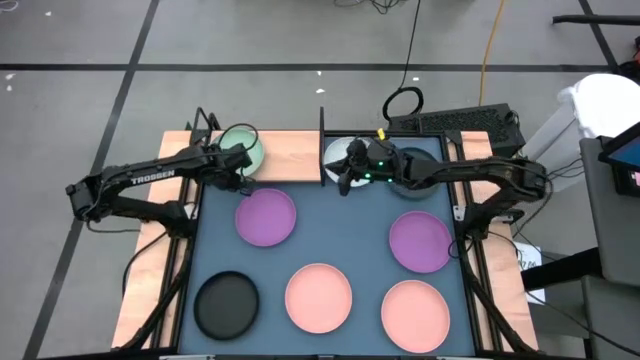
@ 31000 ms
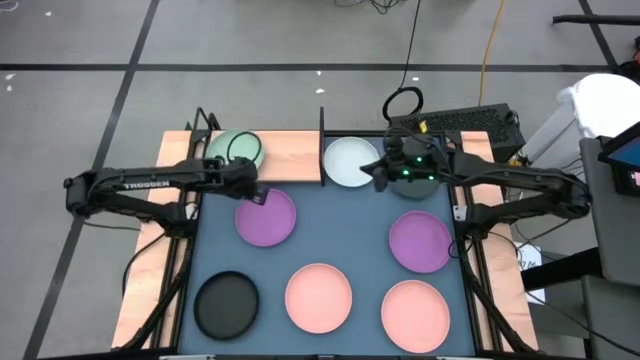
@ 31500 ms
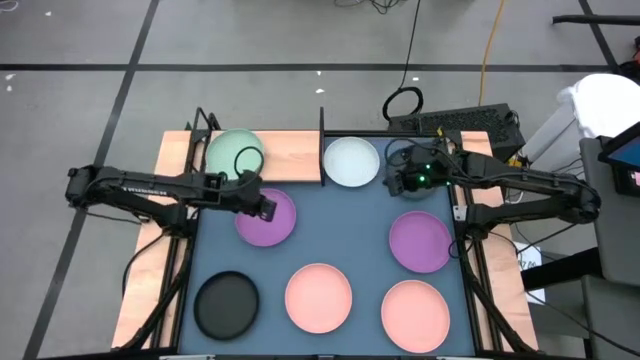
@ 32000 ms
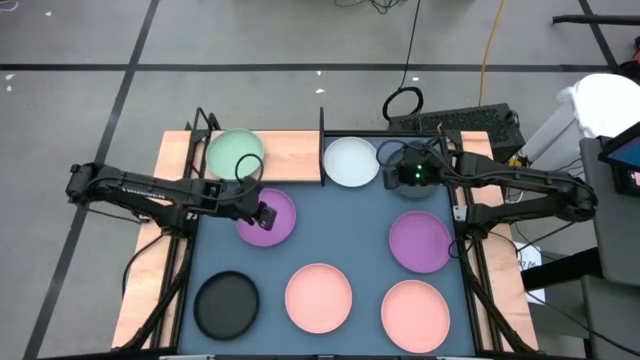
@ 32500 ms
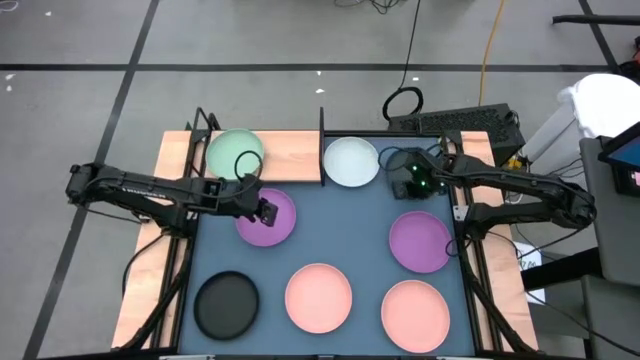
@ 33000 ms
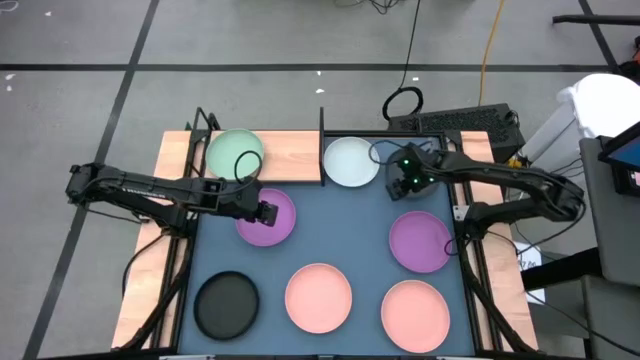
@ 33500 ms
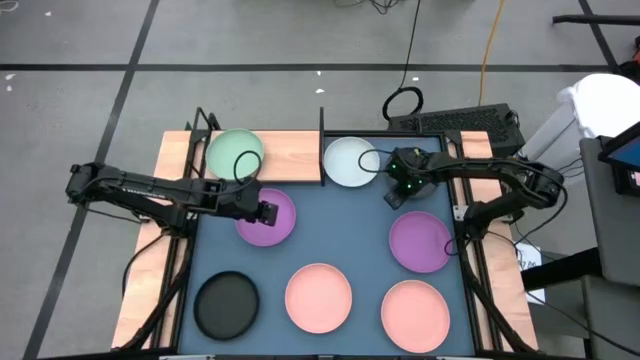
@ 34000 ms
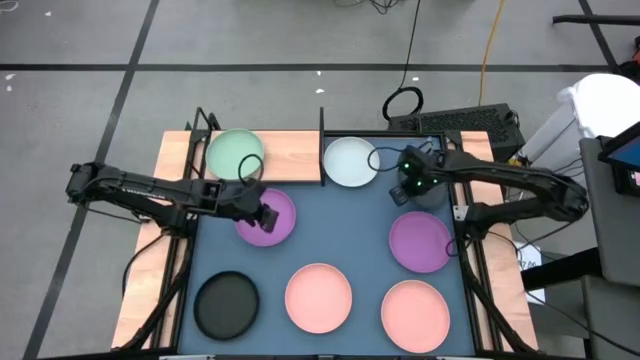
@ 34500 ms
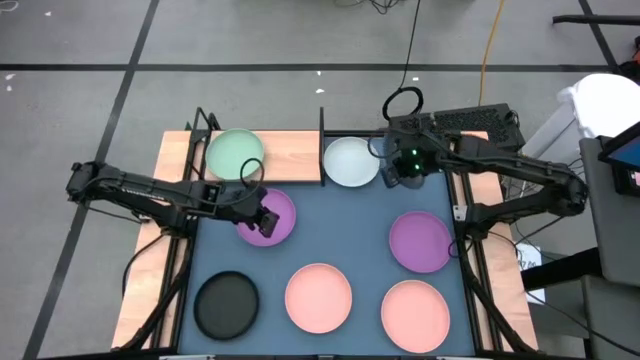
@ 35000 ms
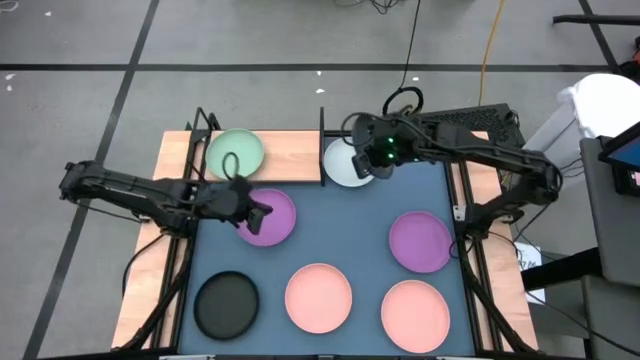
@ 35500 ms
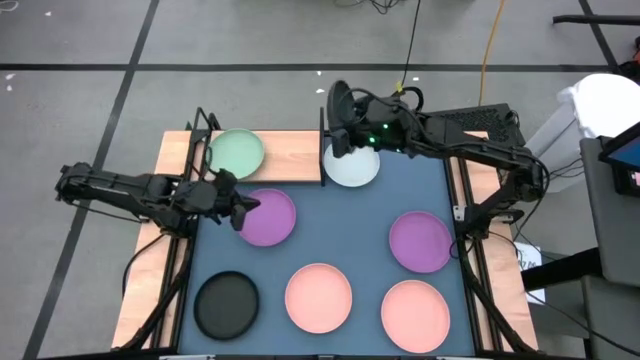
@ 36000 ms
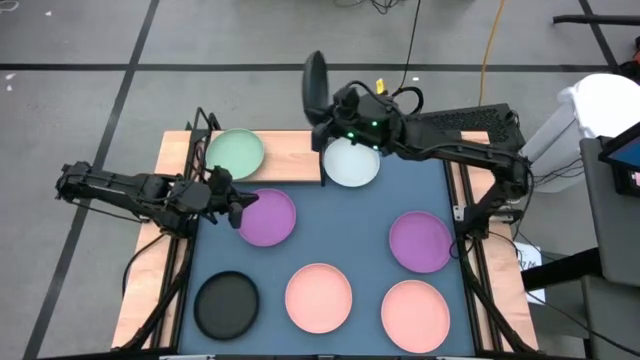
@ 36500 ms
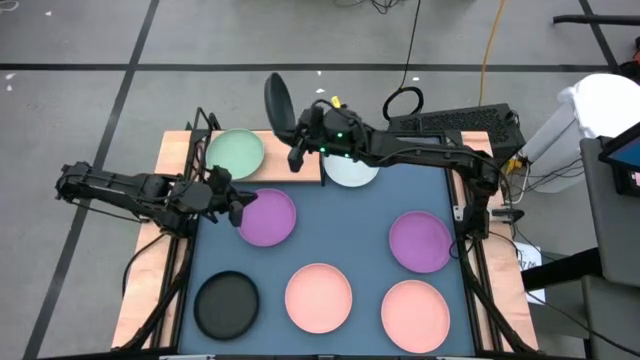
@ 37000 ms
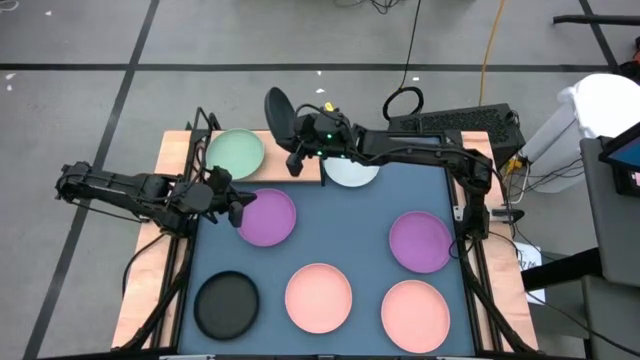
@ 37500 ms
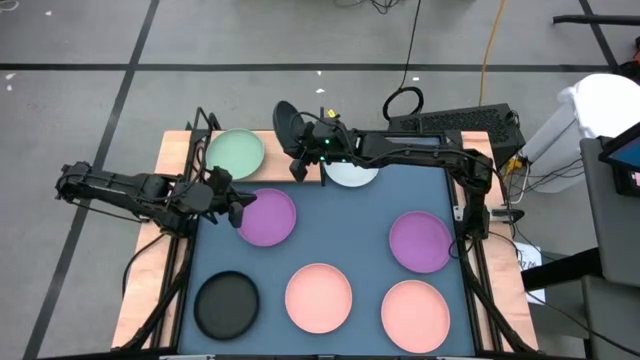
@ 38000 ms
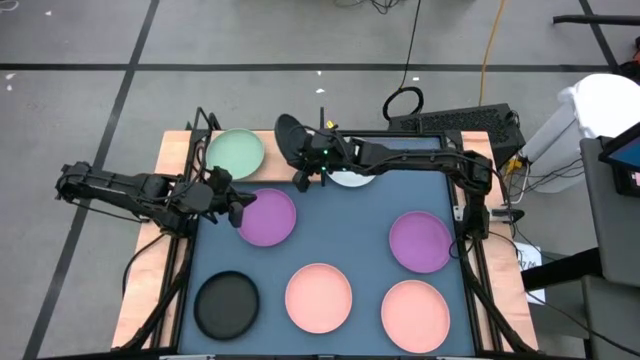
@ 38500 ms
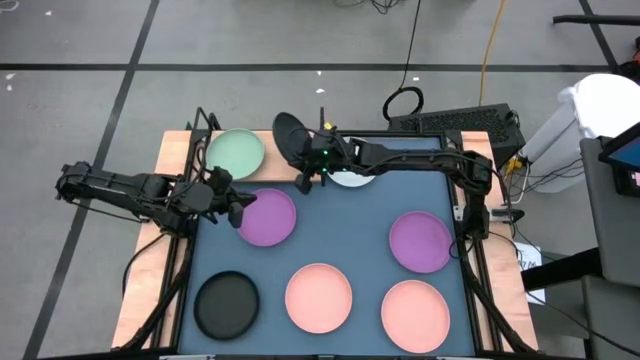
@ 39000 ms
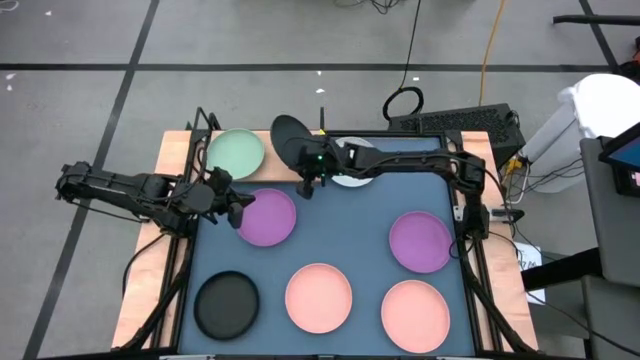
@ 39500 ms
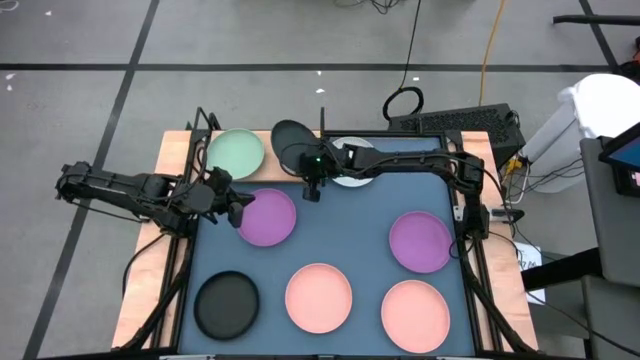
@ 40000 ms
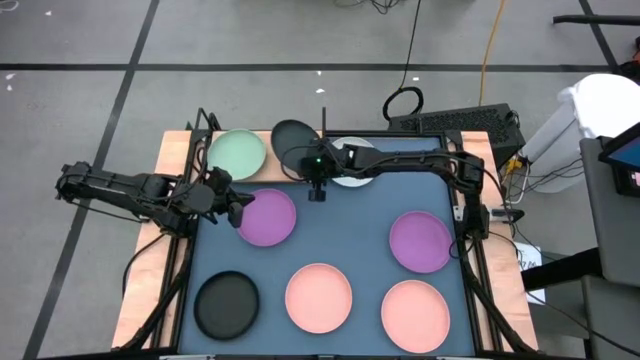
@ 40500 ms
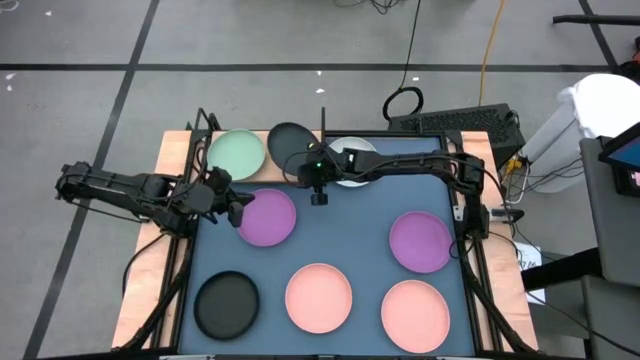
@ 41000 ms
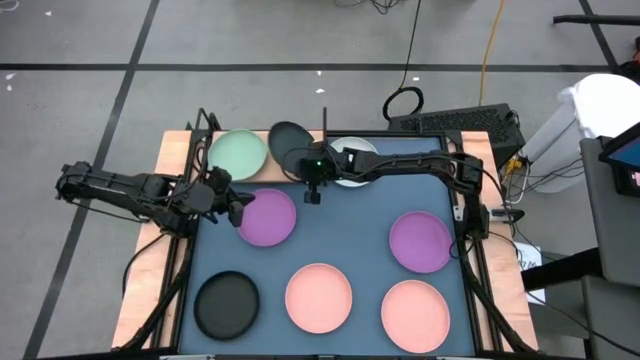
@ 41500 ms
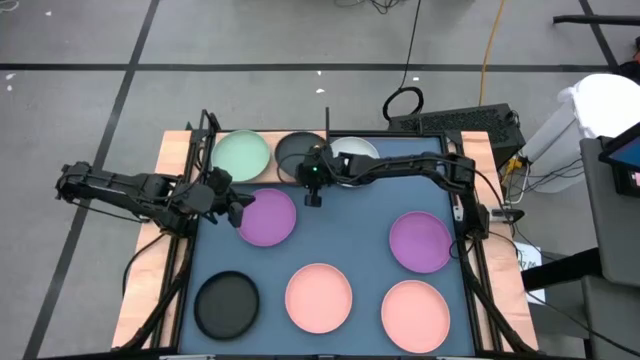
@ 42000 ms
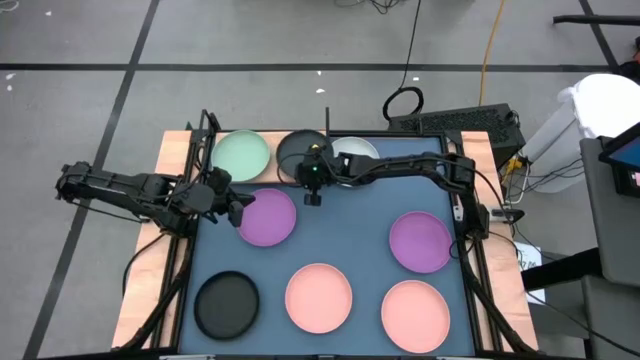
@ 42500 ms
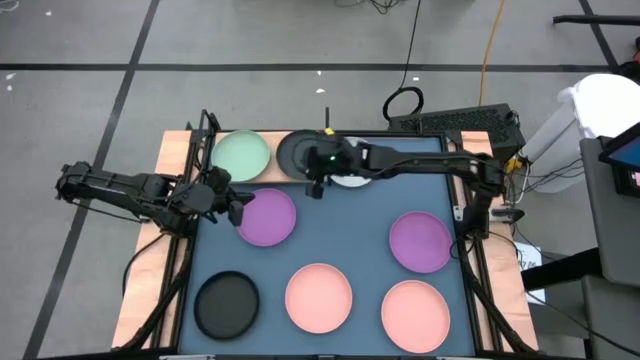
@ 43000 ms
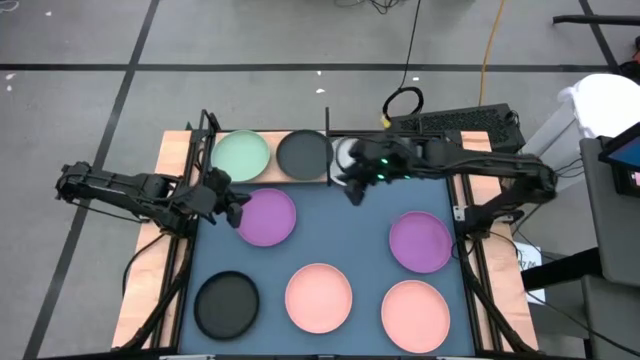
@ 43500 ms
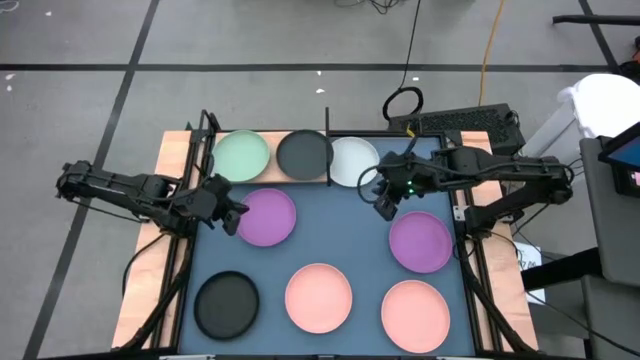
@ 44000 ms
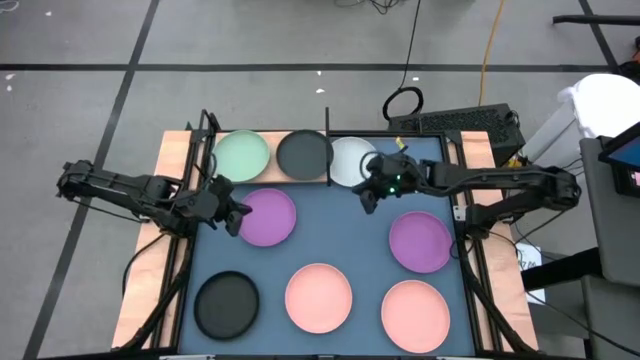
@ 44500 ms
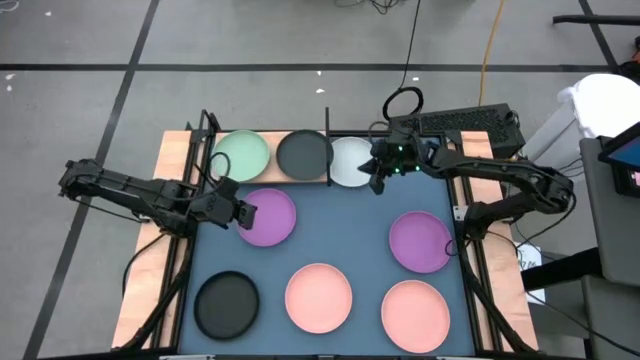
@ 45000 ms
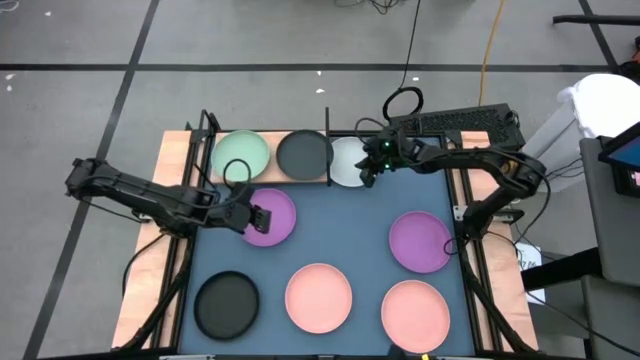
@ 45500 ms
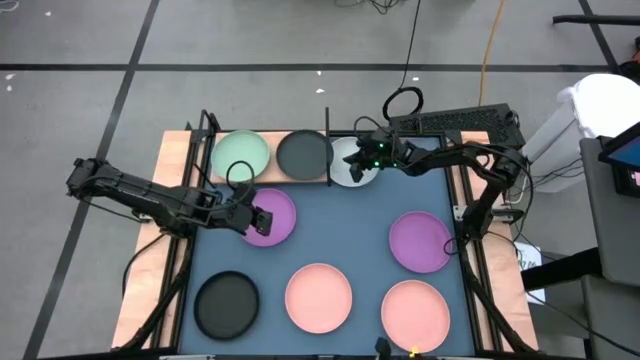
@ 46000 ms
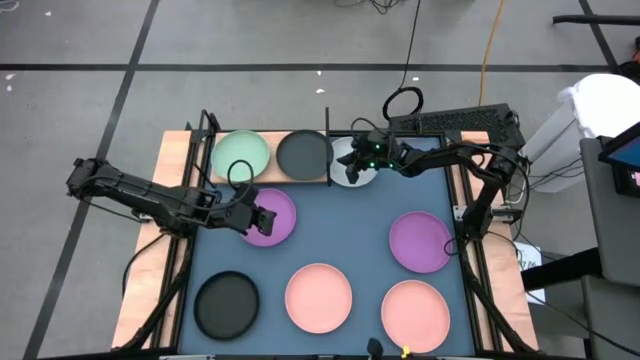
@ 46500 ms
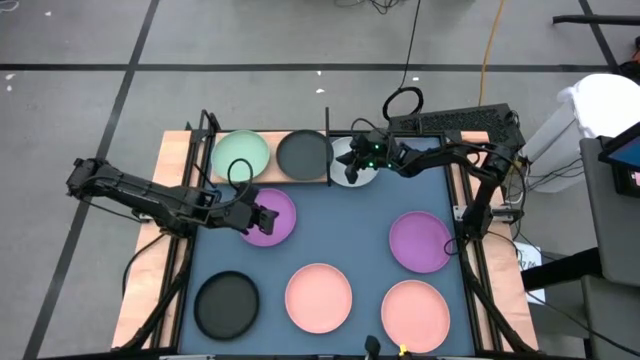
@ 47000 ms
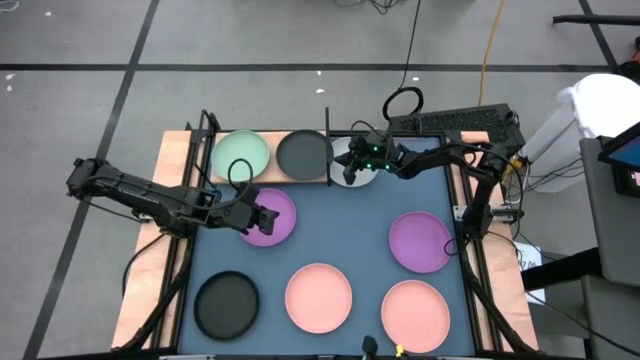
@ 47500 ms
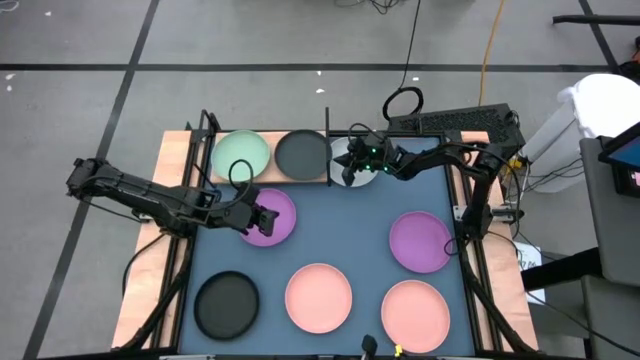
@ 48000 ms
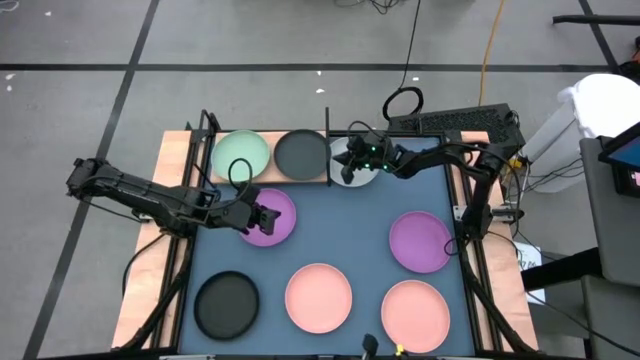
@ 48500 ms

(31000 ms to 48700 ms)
Task: Place and stack plates onto a shelf
Put the top black plate on the shelf
